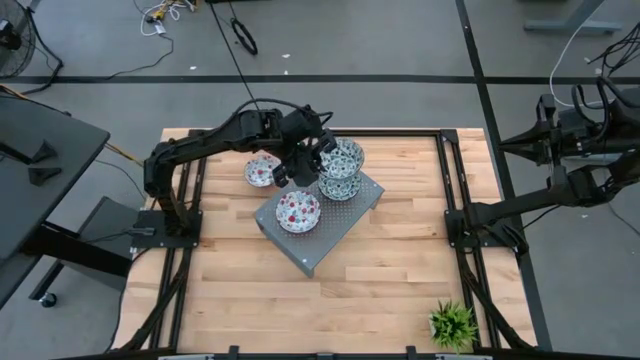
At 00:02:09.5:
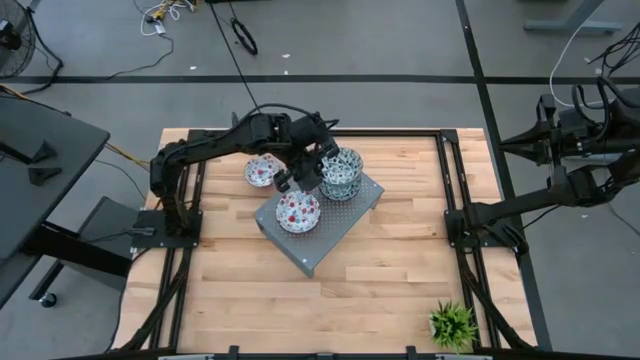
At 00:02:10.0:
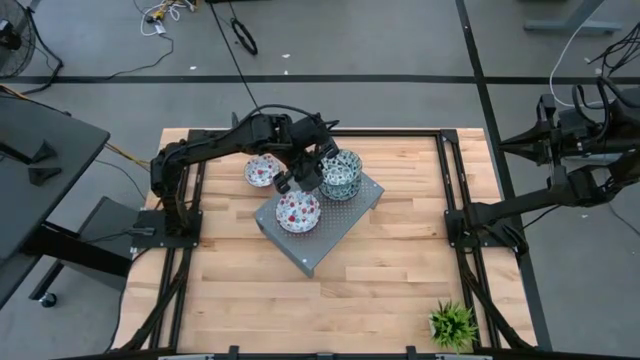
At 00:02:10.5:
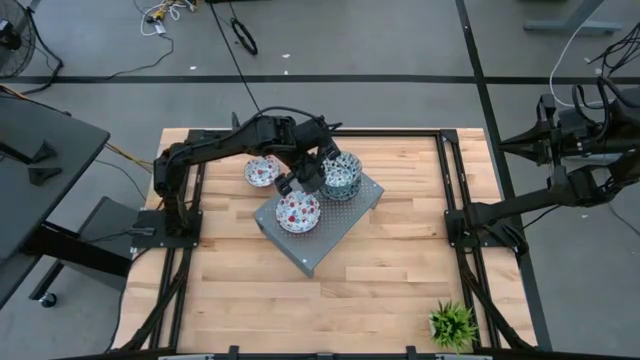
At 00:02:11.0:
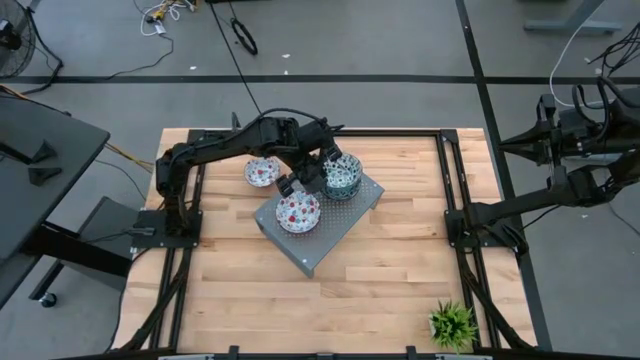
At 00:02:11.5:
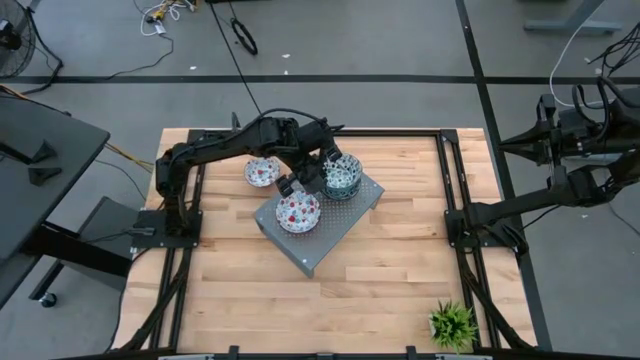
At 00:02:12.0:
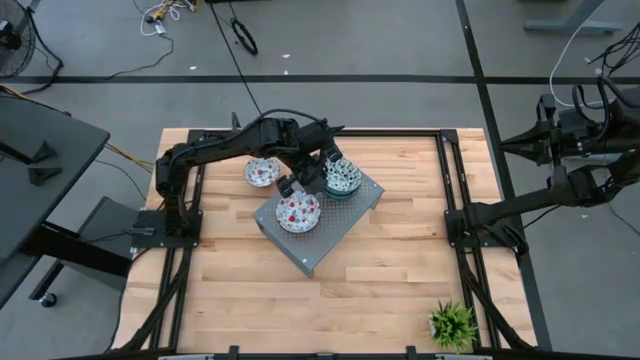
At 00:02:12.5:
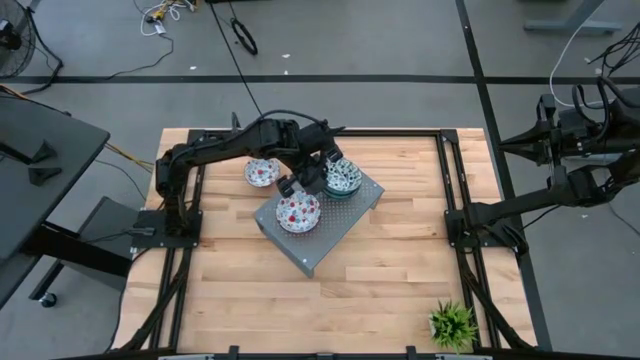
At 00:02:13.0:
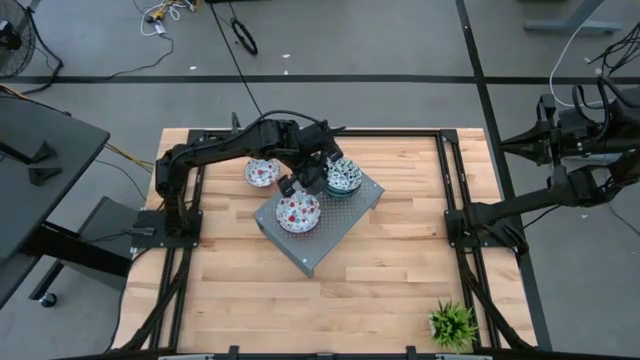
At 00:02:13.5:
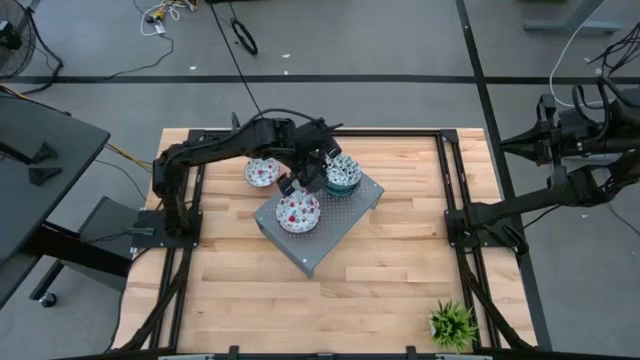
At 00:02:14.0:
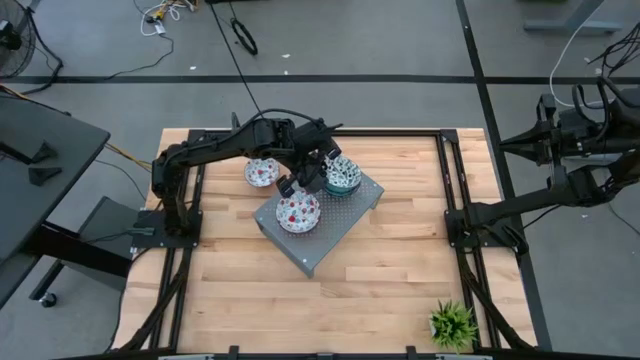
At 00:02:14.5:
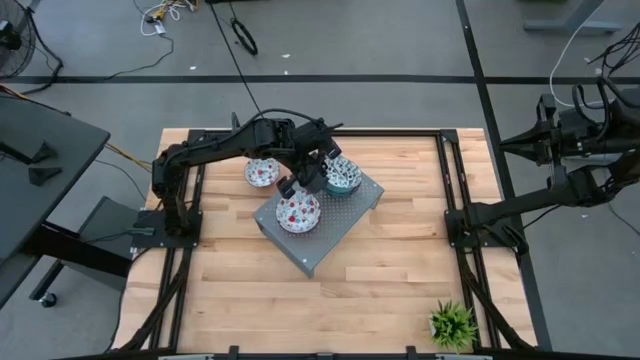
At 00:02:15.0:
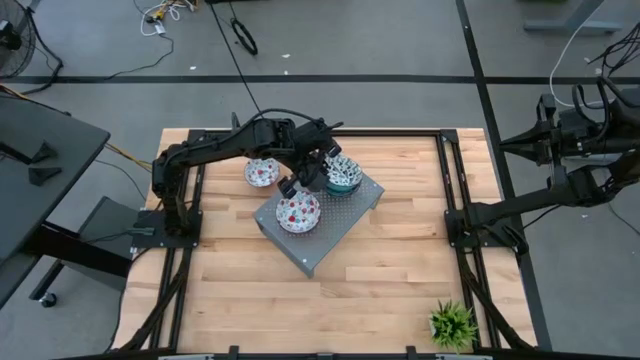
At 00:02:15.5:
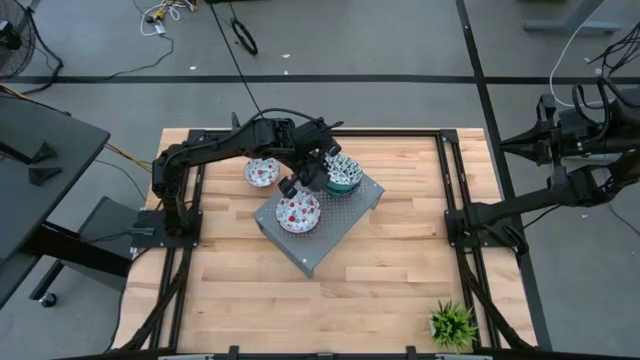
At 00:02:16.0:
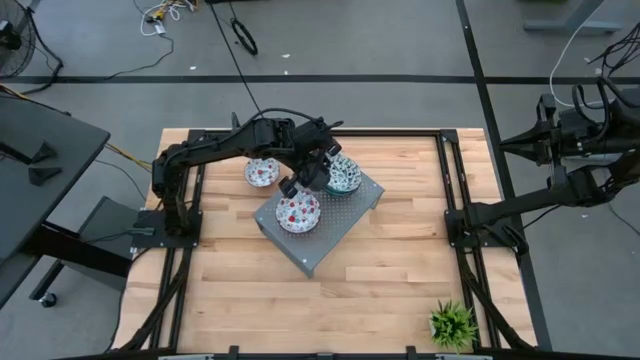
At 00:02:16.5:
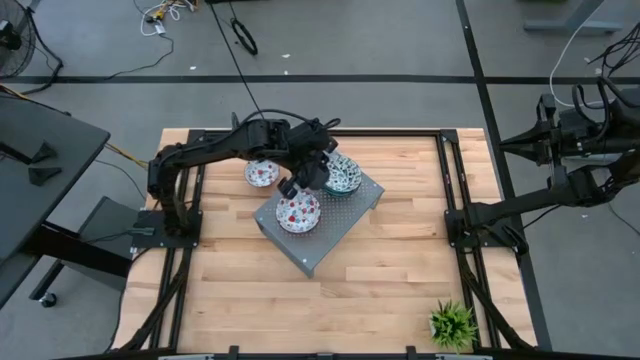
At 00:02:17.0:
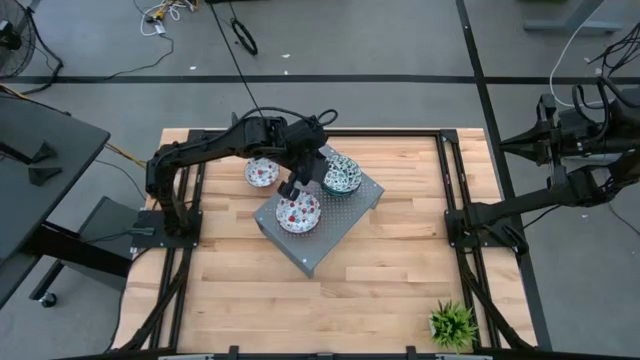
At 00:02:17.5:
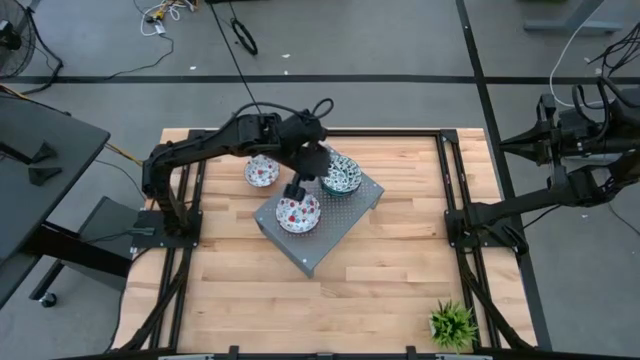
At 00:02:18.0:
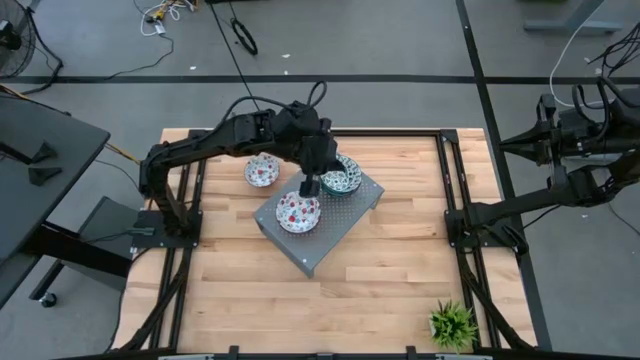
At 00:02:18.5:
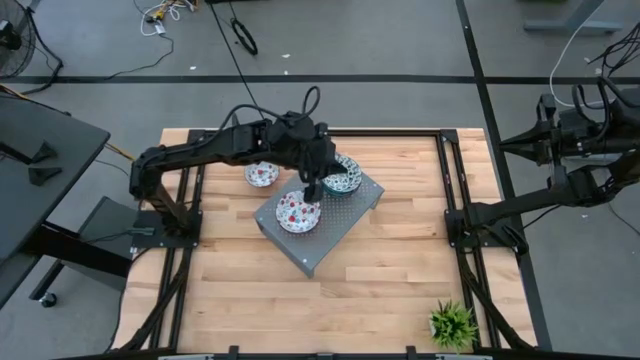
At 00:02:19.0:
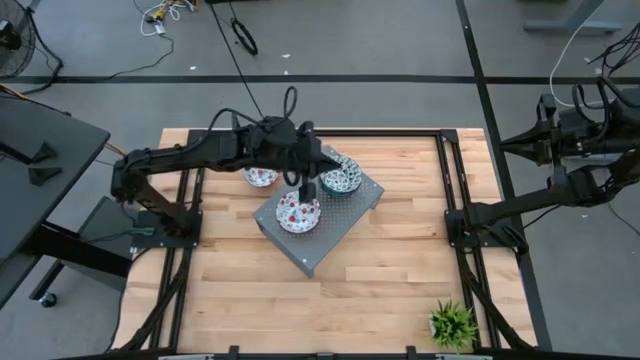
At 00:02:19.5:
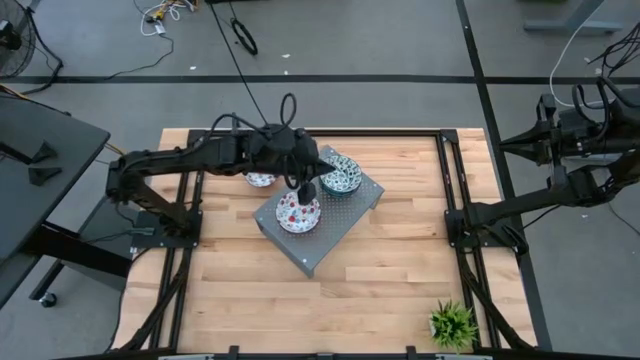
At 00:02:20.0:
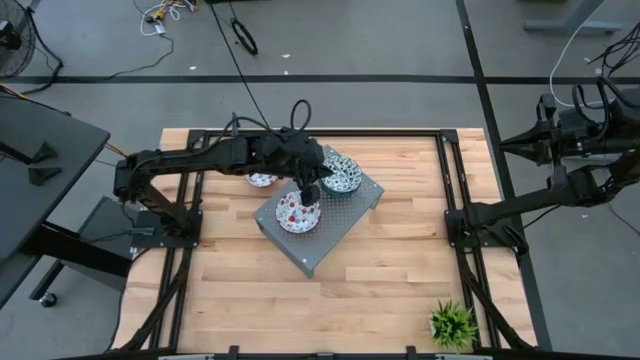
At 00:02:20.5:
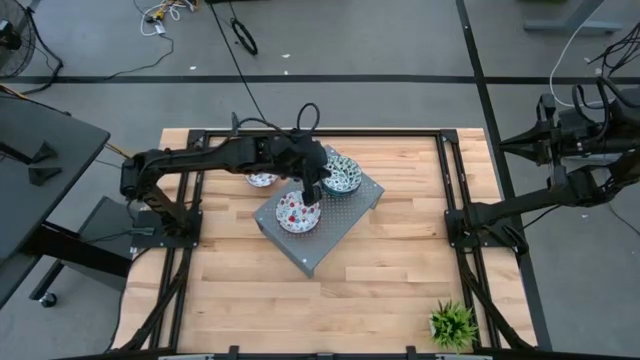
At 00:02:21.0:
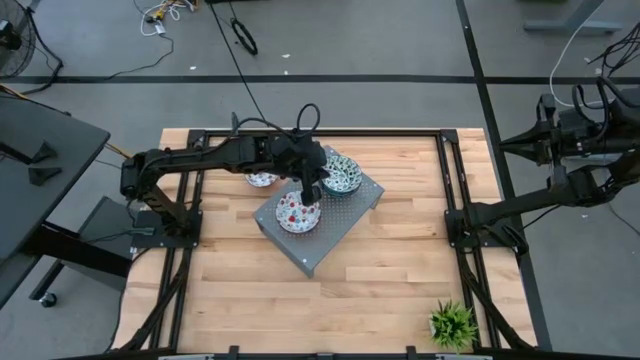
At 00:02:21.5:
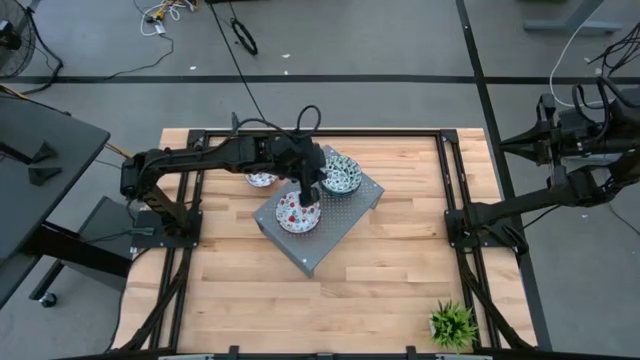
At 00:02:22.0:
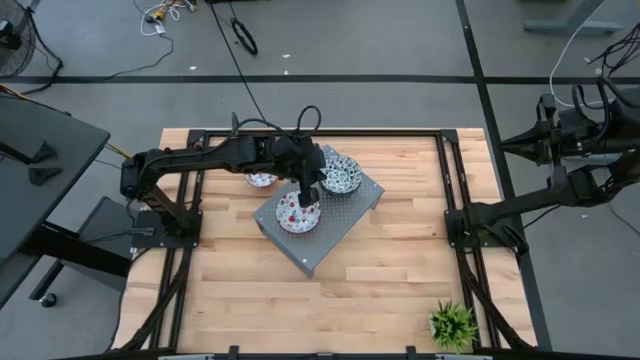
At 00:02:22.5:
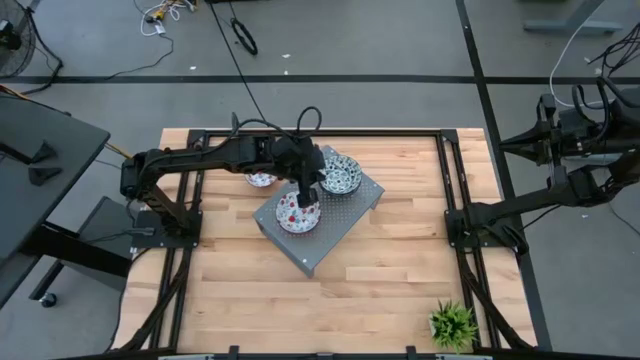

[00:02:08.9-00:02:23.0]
Task: Pick & Place Mini bowls
Stack the blue patterned bowl on top of the blue patterned bowls on the shelf

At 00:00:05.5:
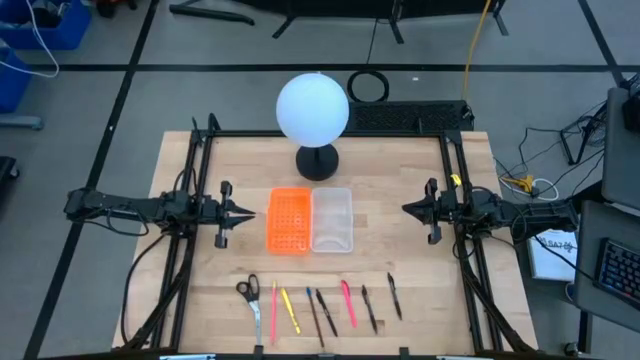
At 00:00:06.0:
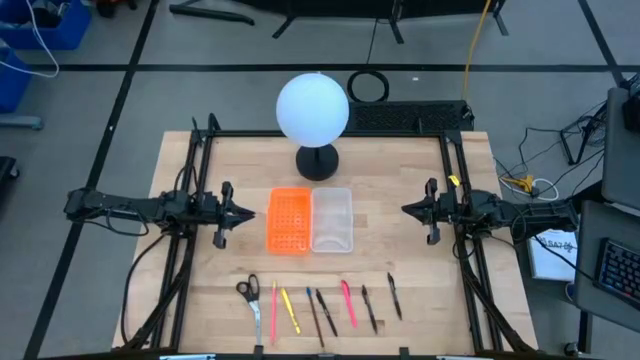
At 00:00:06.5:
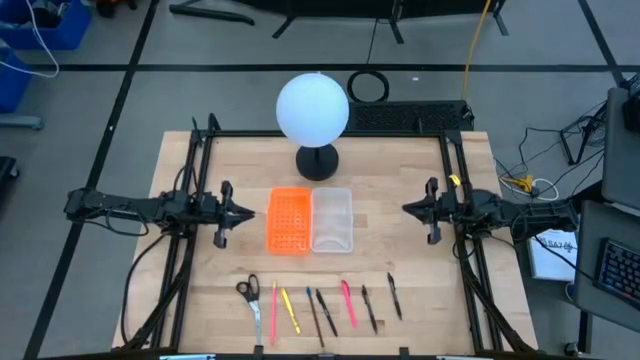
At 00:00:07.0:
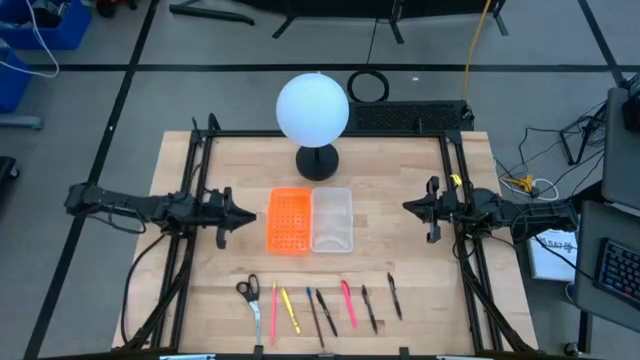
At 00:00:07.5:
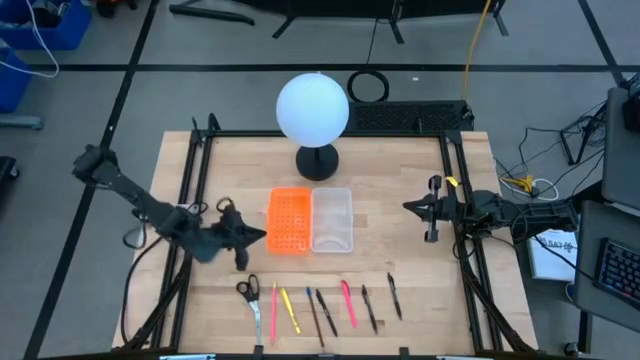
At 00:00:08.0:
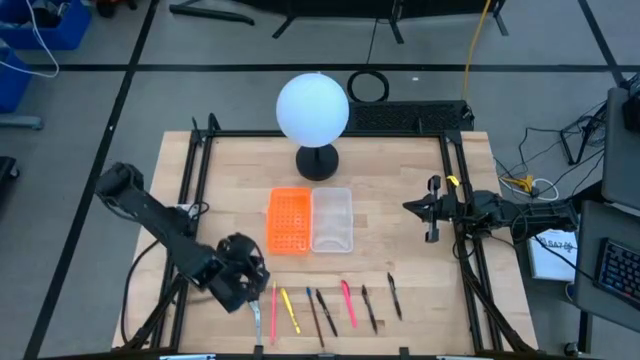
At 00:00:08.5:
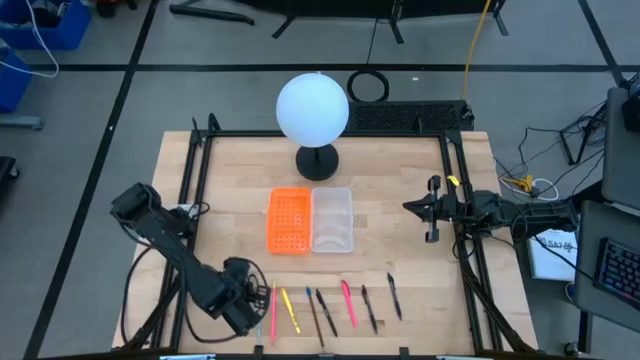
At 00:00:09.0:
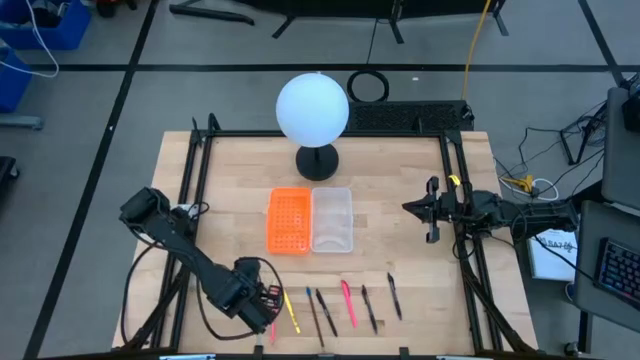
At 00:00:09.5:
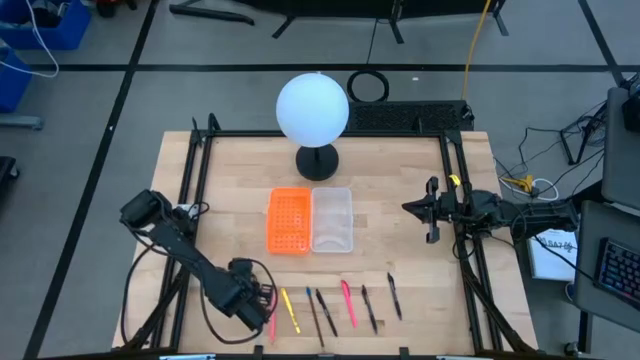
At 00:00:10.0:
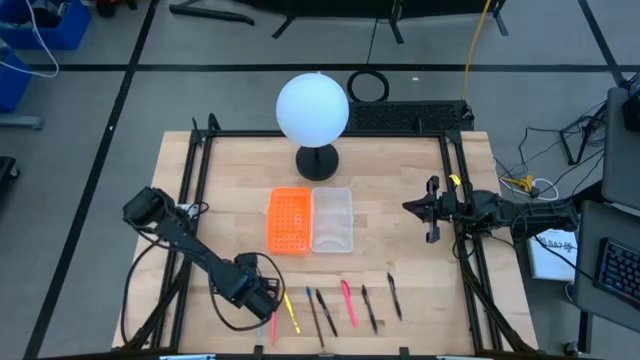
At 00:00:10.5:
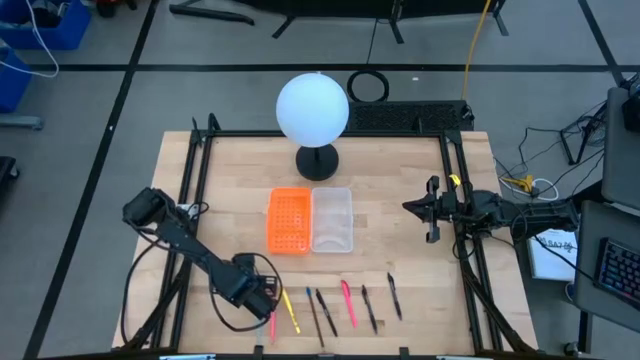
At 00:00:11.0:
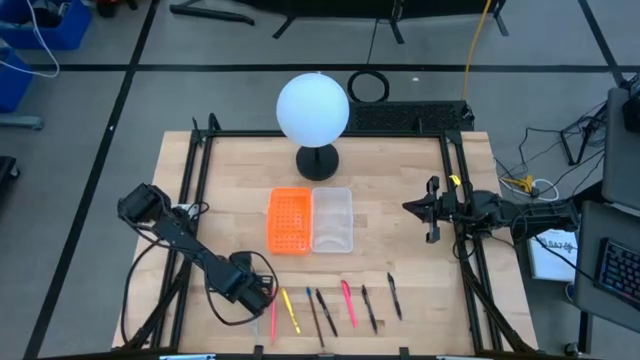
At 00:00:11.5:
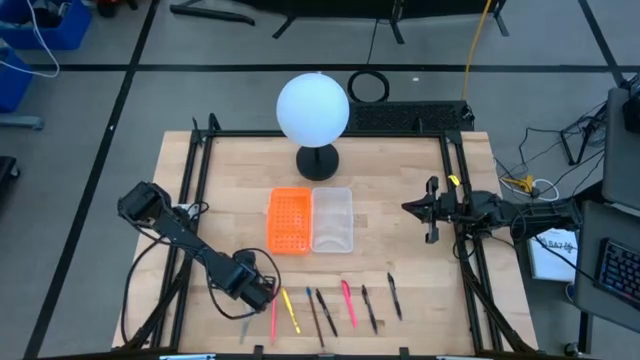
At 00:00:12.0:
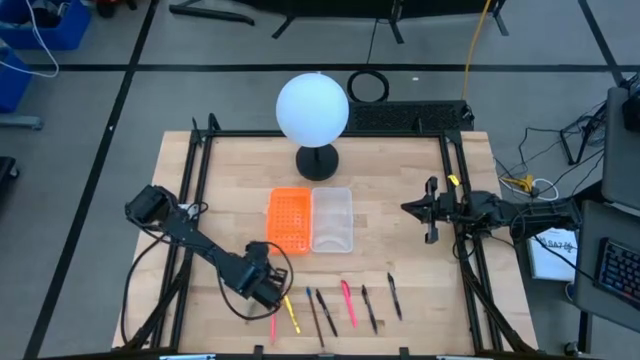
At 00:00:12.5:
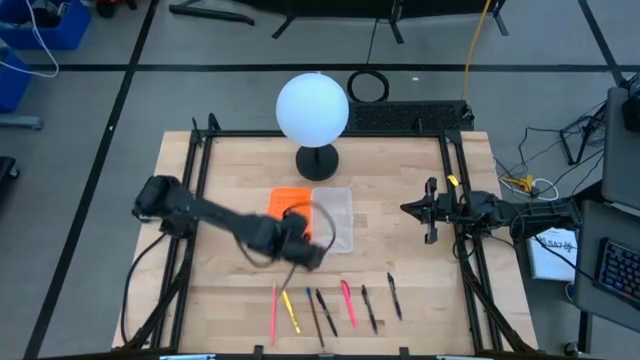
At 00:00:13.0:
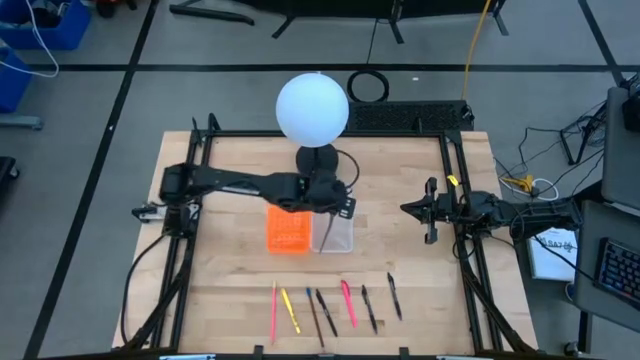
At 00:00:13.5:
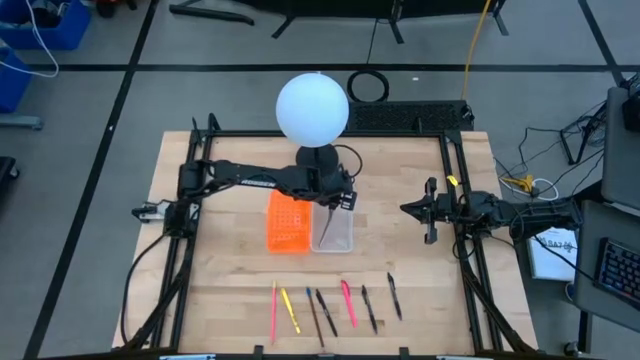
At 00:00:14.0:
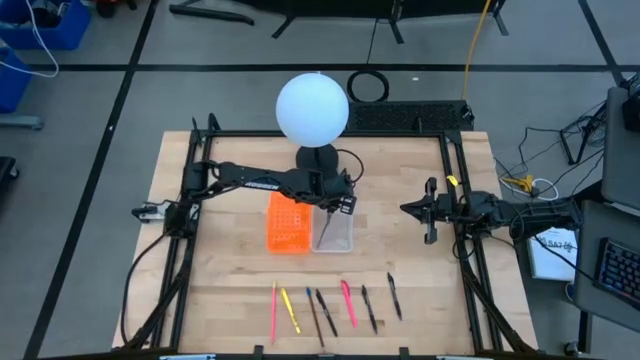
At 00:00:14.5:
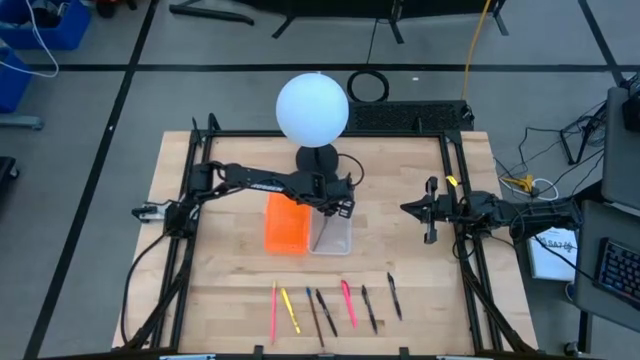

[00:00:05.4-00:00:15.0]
Task: Pick & place school supplies into a supply box
Put the black scissors into the orange supply box
